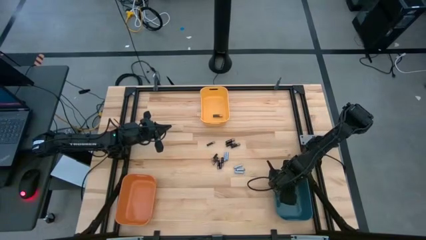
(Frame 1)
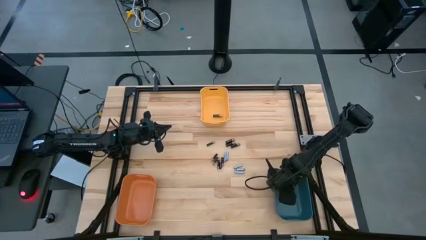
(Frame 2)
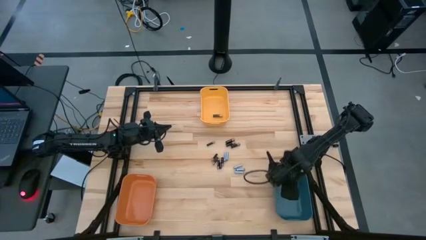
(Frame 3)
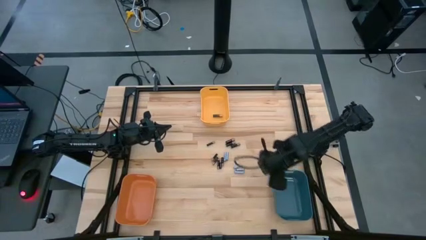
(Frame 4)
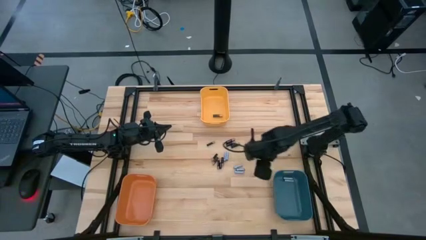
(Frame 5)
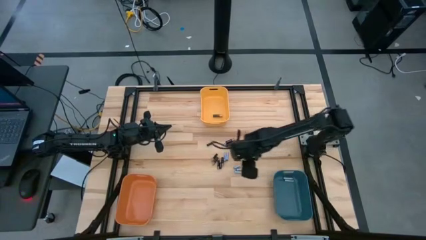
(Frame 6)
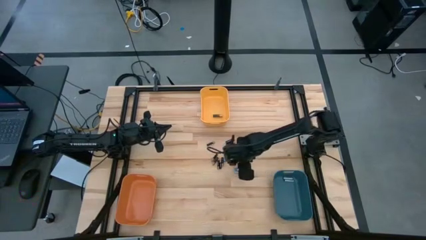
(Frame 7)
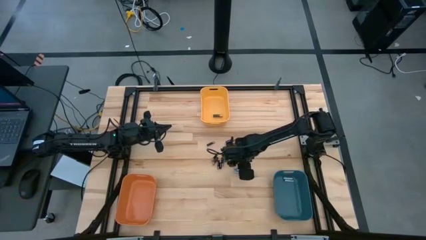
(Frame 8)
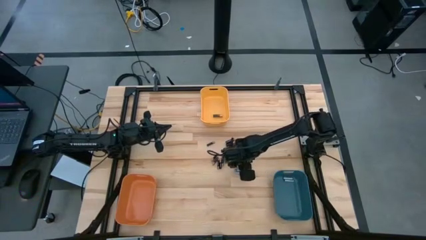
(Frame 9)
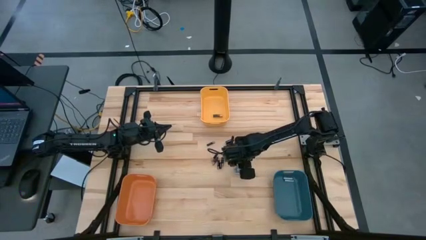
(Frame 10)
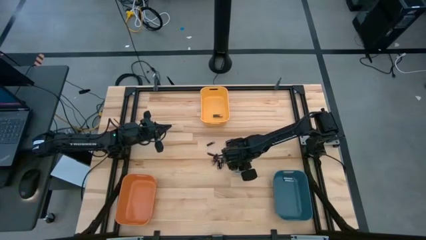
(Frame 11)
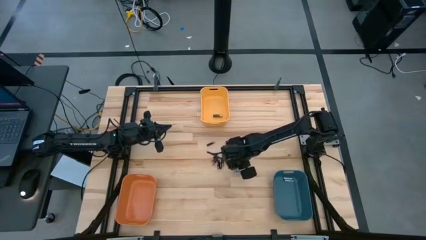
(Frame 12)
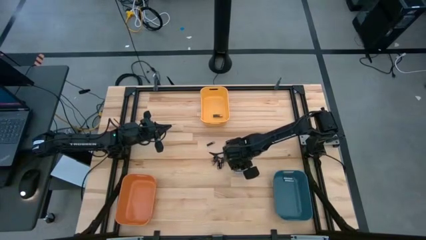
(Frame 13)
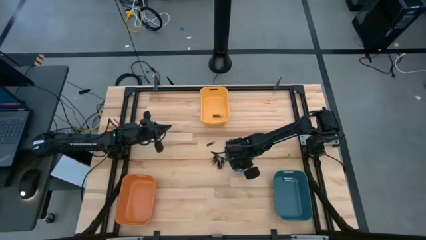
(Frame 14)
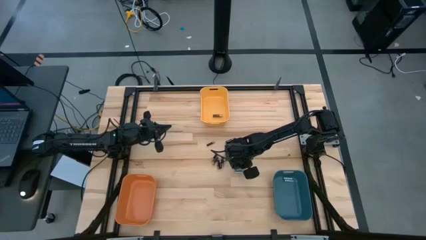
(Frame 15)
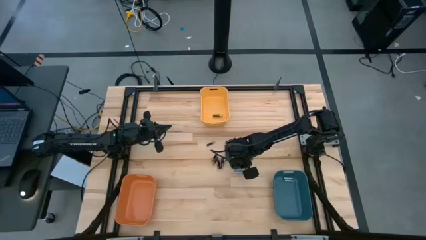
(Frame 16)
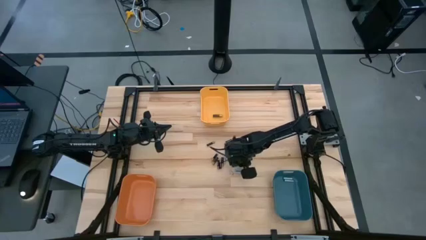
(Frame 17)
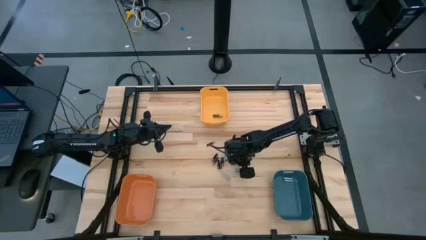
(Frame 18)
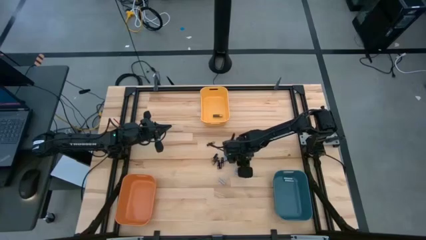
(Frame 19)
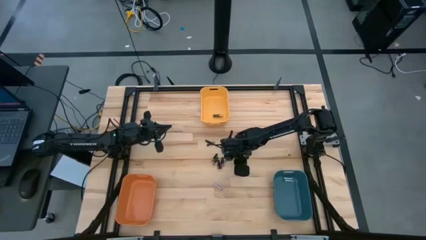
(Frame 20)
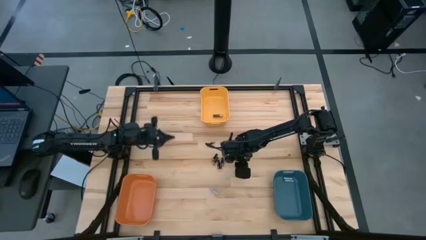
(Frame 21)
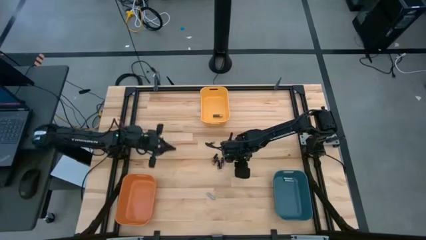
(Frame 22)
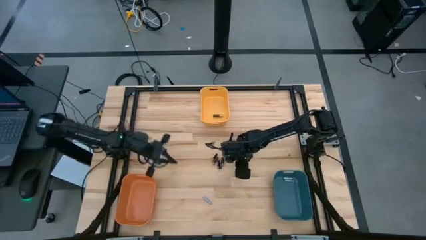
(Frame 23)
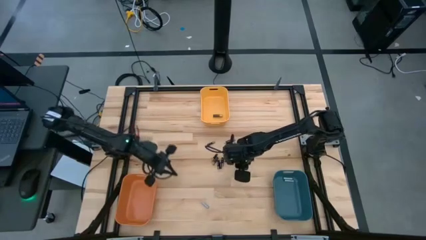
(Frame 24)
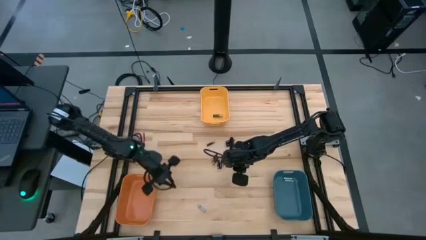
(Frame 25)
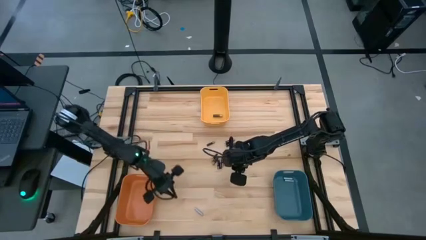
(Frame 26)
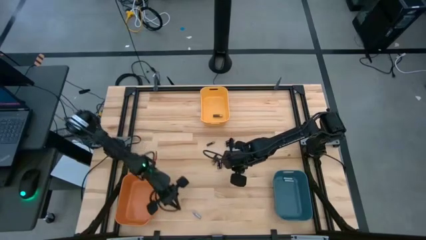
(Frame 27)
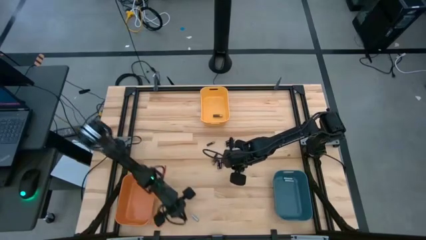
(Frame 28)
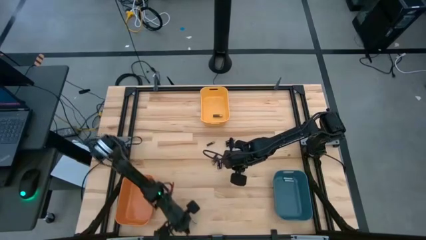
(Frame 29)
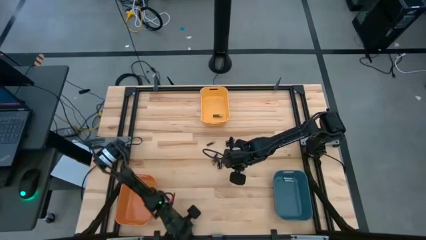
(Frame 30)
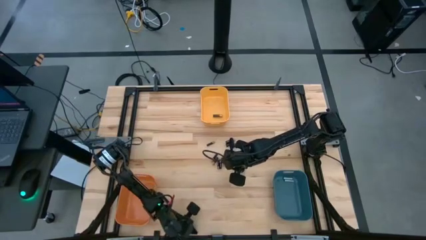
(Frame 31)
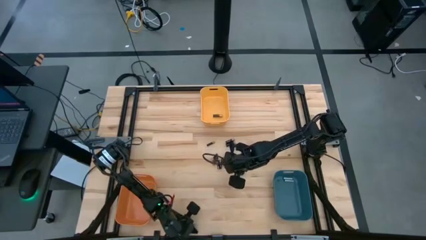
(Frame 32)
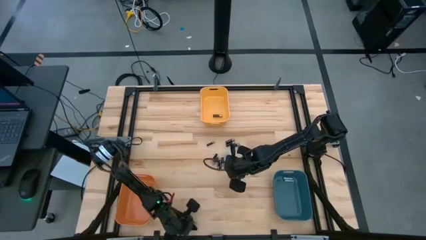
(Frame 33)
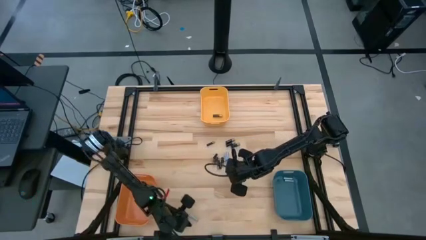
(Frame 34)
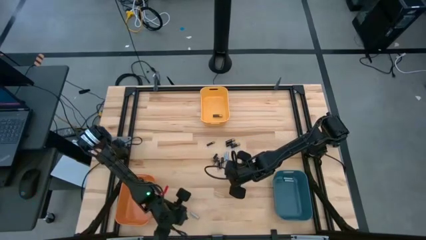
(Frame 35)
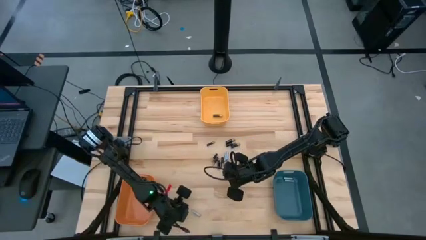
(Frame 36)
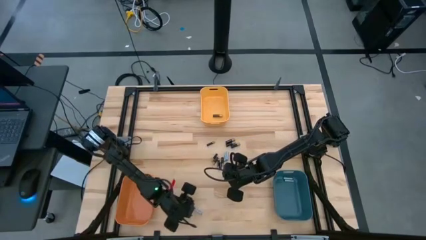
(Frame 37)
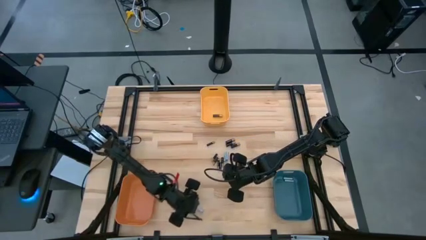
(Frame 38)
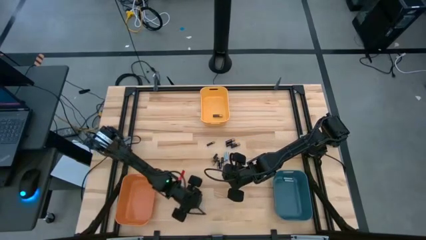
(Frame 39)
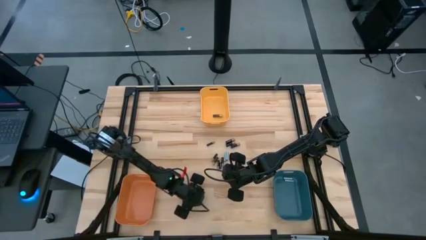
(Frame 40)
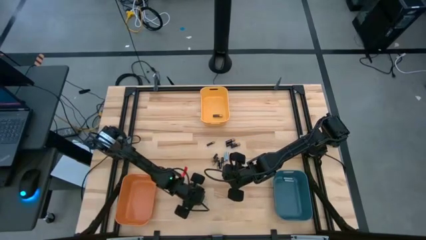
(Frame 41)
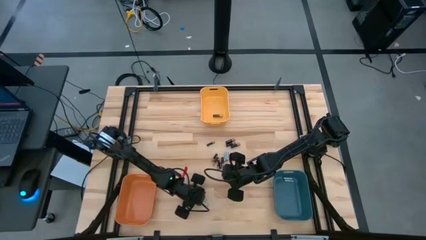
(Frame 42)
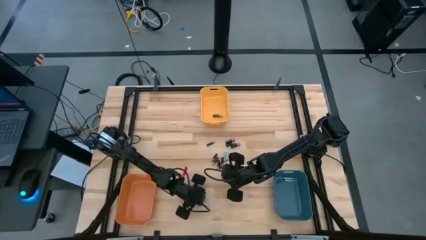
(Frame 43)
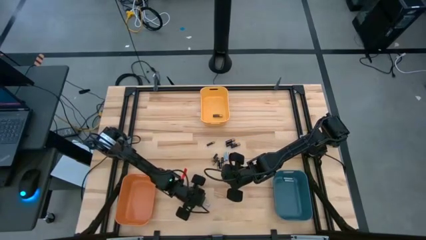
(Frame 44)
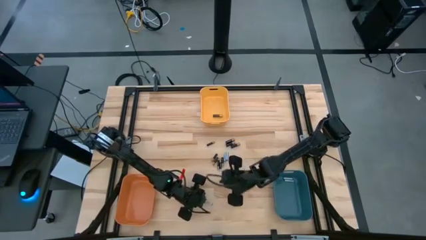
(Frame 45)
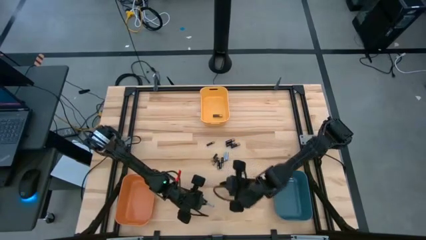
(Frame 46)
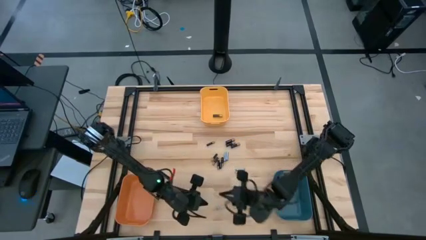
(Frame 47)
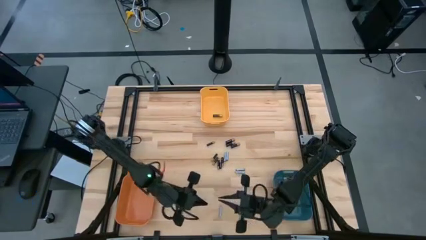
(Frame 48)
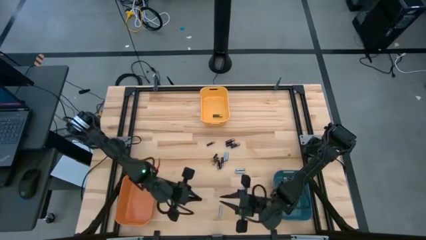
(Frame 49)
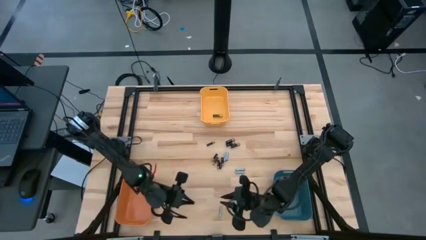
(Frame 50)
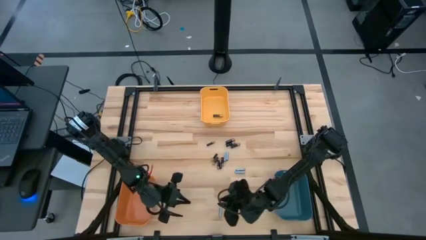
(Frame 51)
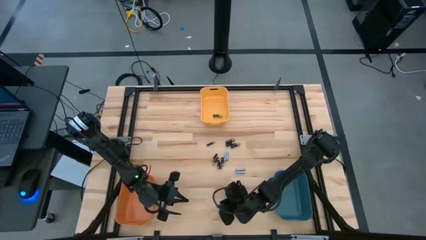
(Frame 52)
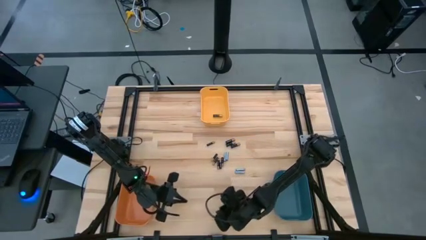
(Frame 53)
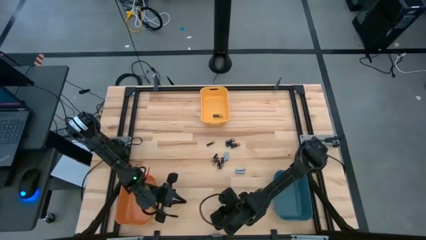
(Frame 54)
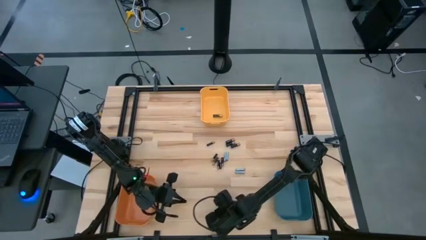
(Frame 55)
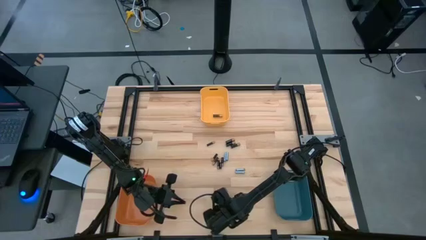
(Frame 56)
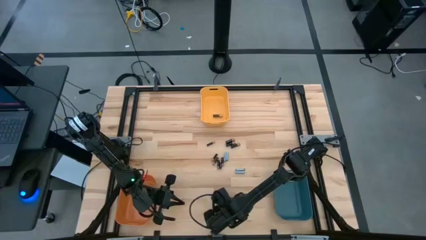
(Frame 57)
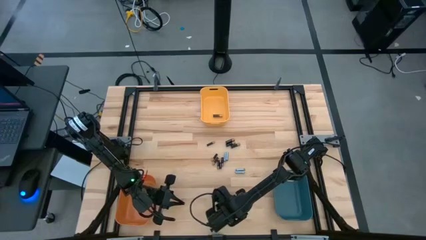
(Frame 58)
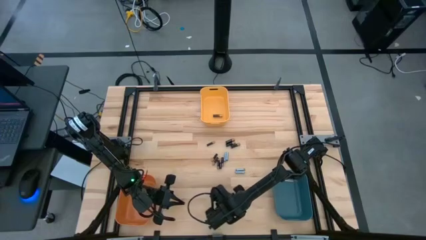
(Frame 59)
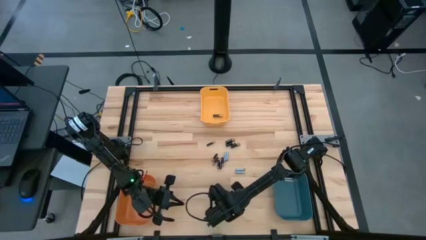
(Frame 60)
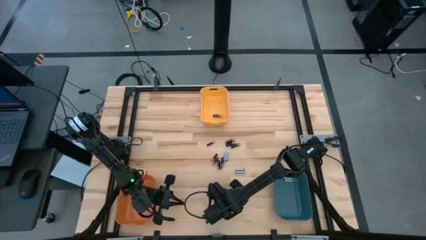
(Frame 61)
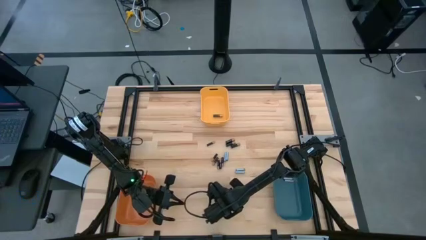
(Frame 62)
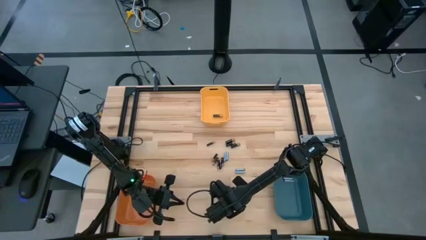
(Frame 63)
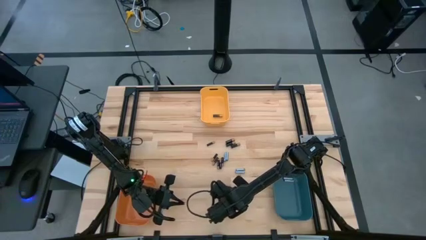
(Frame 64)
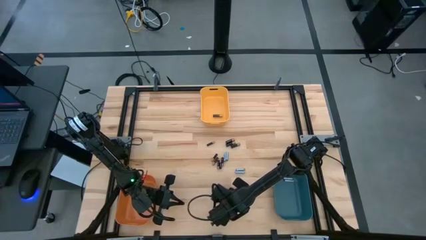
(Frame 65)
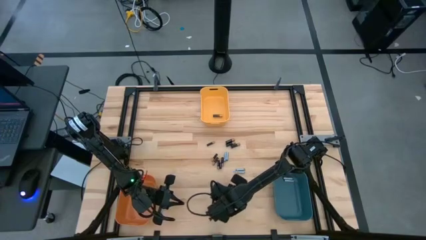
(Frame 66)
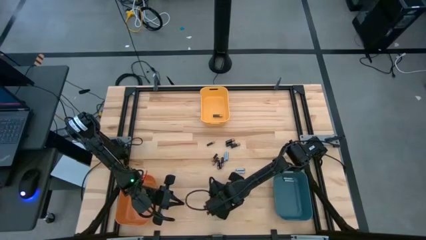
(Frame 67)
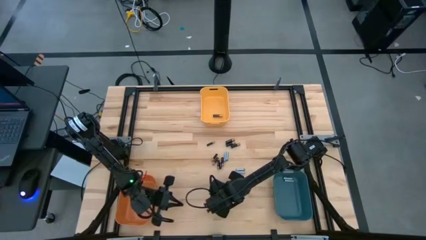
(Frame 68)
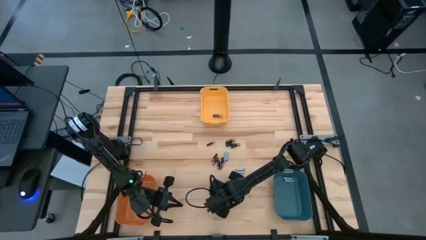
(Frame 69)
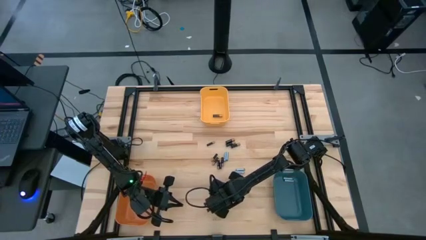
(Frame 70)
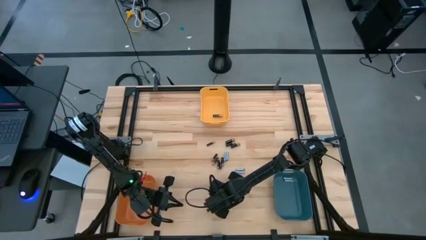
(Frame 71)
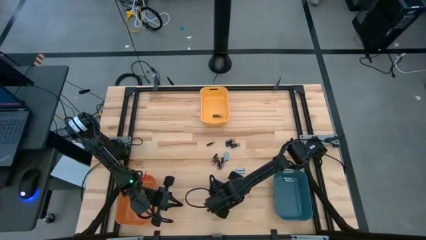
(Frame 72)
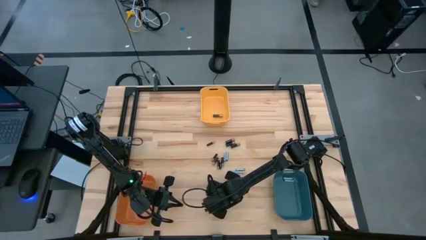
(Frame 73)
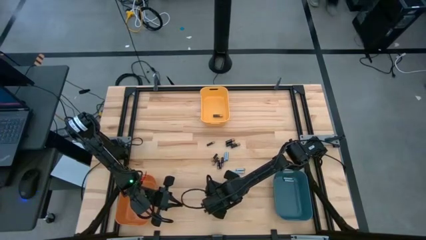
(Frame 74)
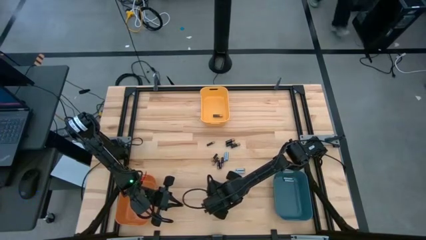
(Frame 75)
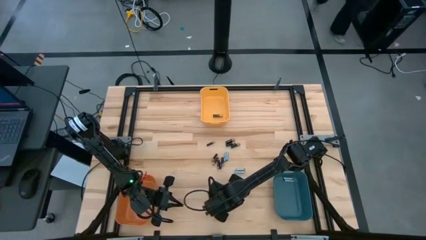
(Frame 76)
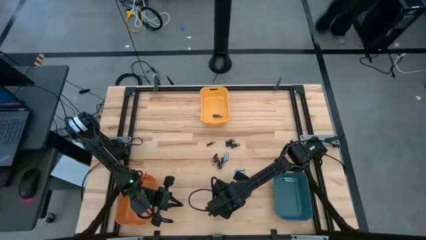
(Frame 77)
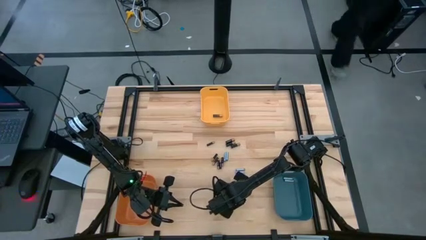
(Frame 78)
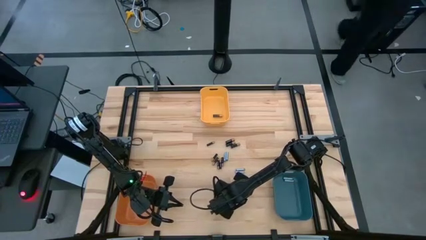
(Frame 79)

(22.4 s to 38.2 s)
Task: Sort batteries
Put the white battery into the blue bin

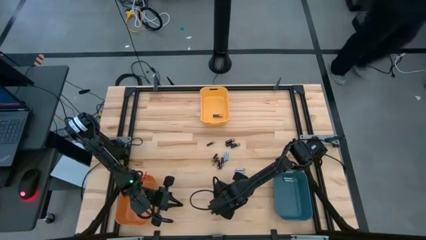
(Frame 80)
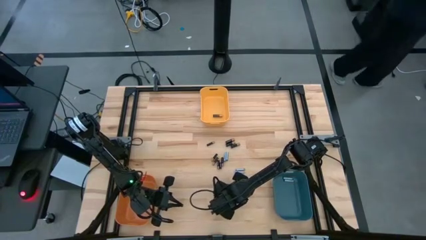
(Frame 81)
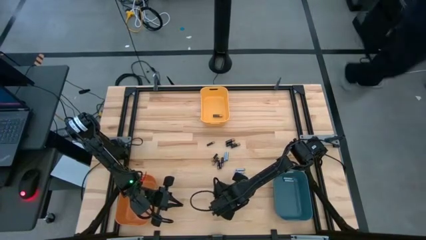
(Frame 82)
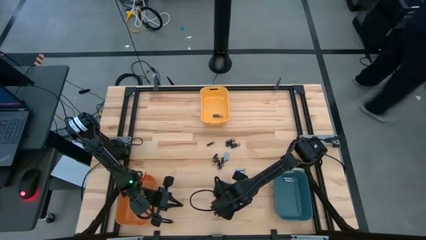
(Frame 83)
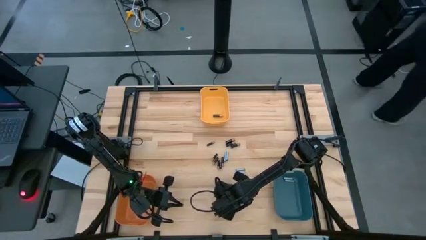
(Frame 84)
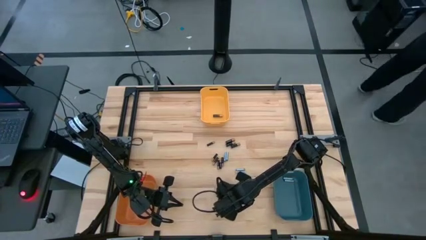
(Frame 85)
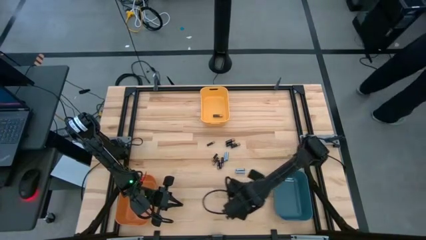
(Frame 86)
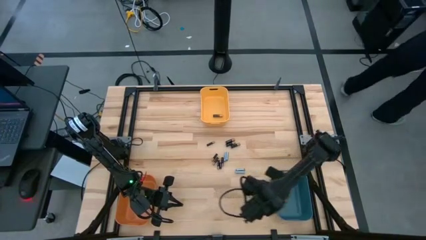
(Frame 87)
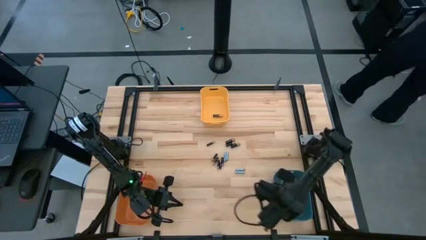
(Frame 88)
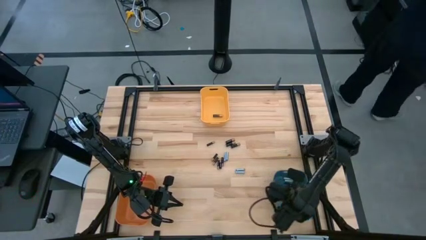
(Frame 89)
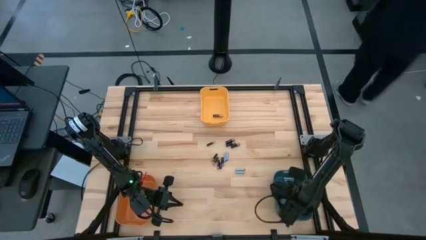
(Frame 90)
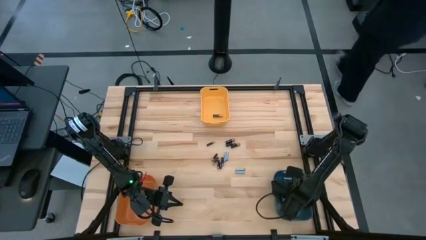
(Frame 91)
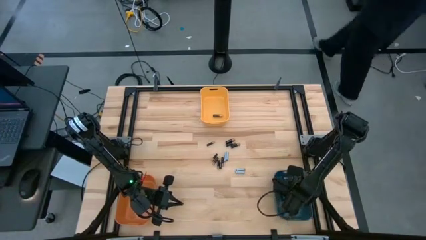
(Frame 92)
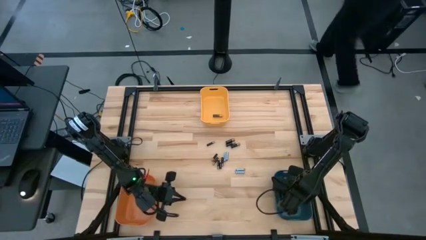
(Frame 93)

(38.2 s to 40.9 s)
Put the white battery into the blue bin
